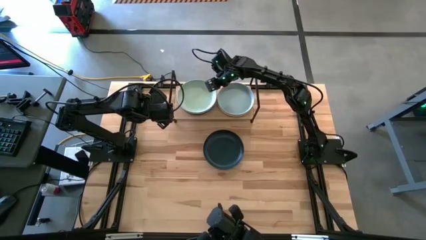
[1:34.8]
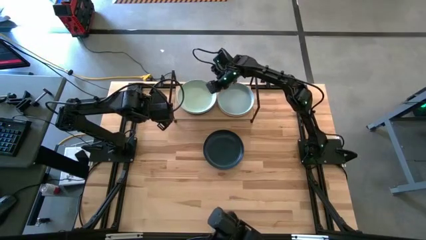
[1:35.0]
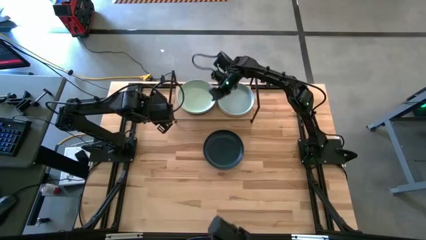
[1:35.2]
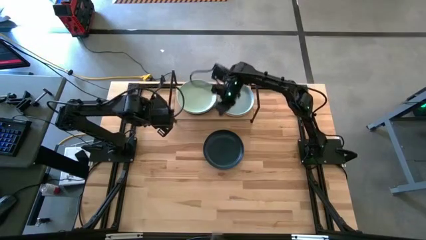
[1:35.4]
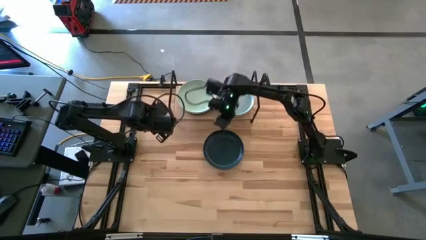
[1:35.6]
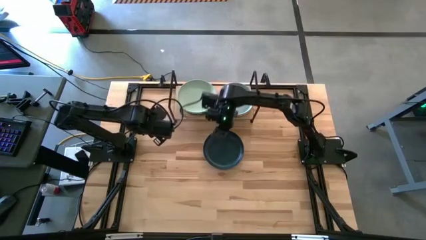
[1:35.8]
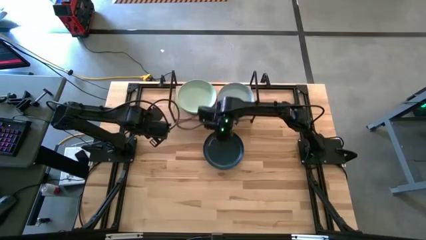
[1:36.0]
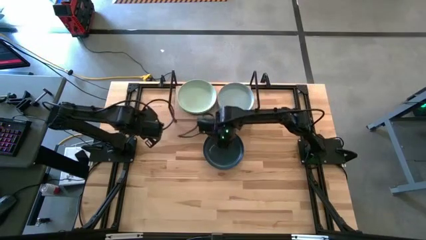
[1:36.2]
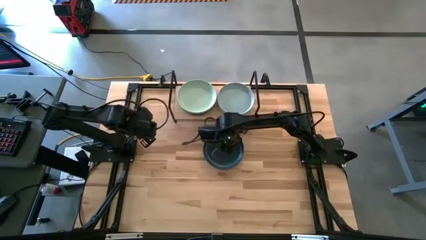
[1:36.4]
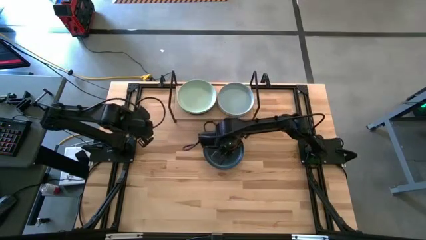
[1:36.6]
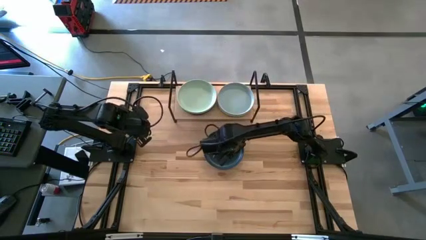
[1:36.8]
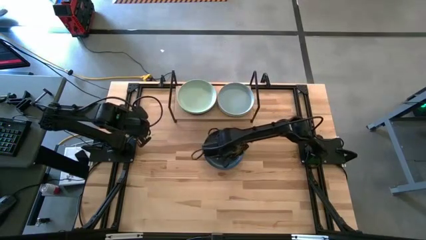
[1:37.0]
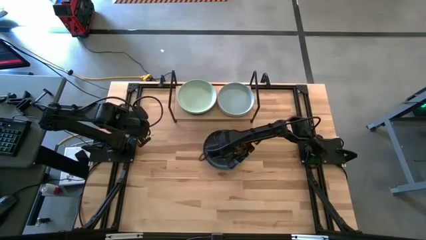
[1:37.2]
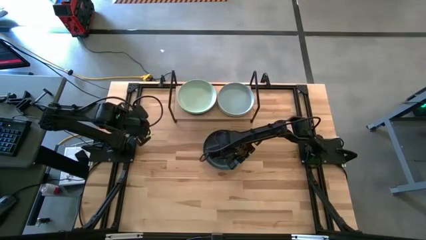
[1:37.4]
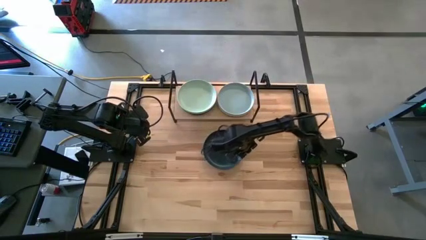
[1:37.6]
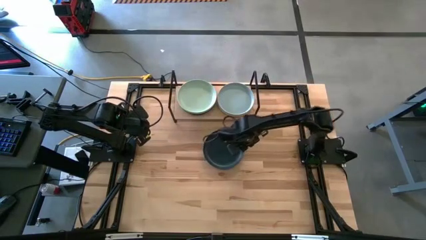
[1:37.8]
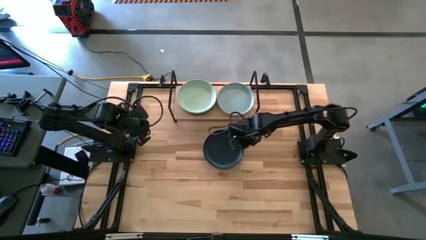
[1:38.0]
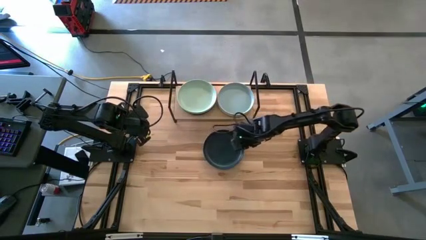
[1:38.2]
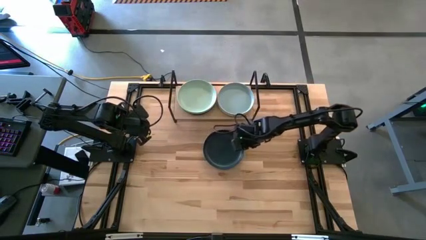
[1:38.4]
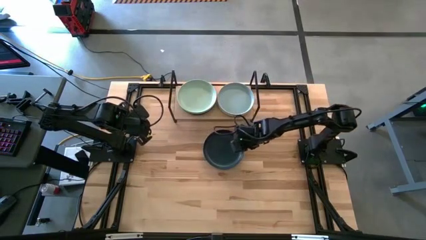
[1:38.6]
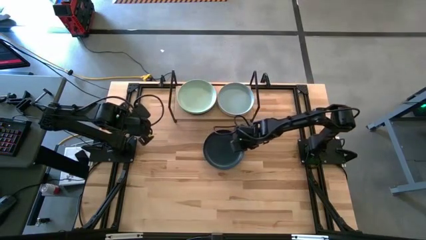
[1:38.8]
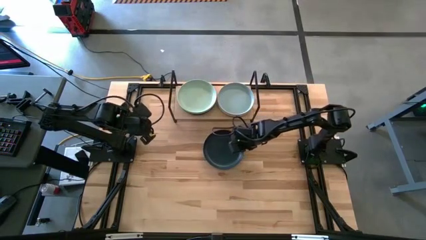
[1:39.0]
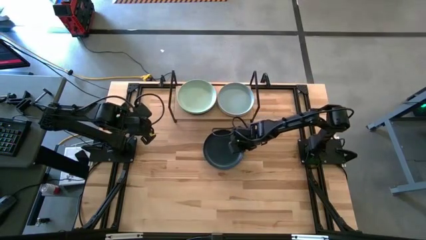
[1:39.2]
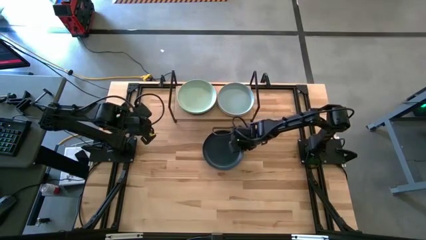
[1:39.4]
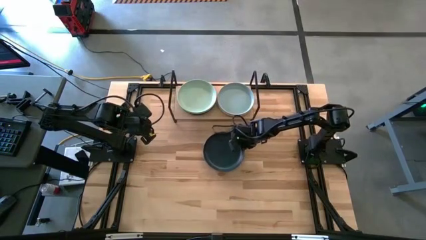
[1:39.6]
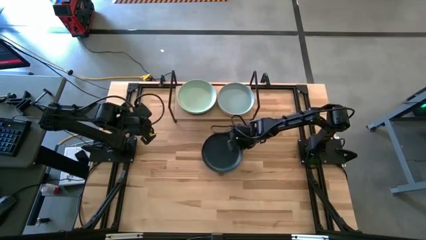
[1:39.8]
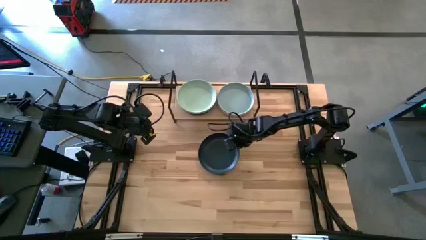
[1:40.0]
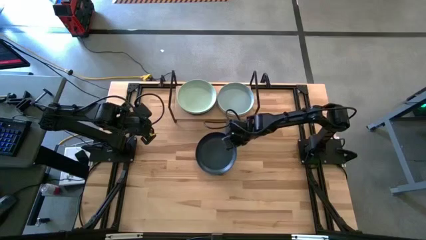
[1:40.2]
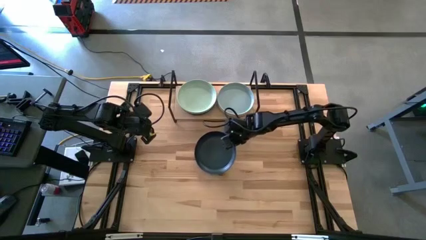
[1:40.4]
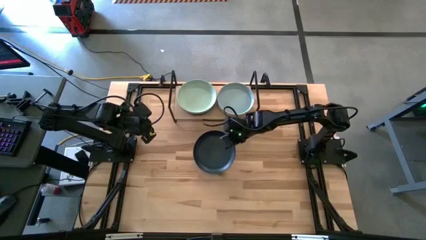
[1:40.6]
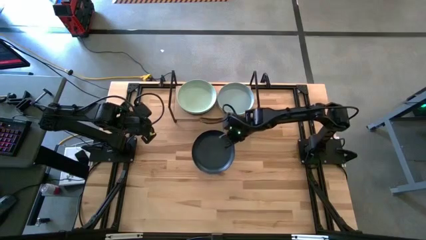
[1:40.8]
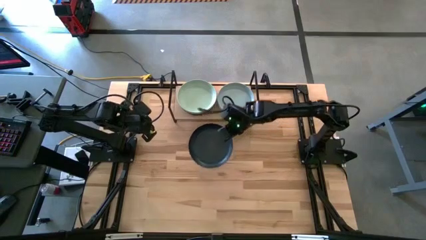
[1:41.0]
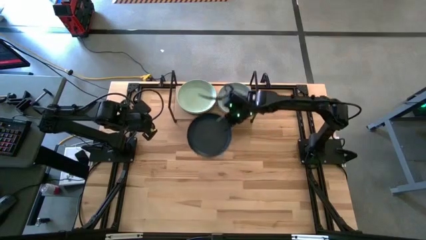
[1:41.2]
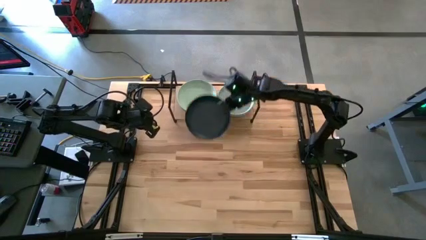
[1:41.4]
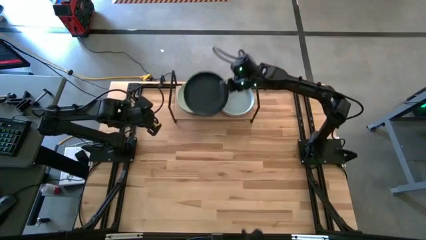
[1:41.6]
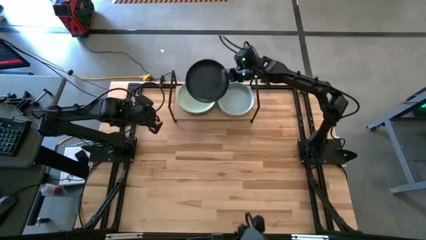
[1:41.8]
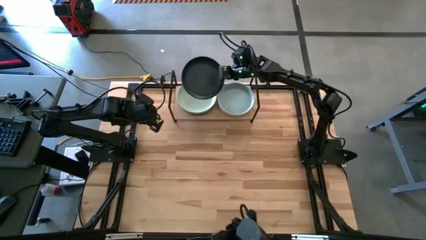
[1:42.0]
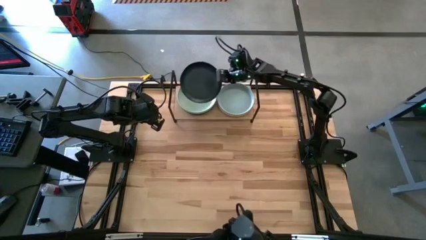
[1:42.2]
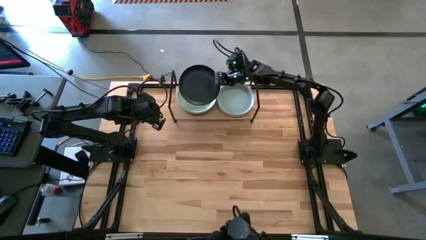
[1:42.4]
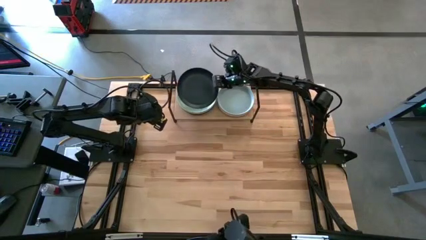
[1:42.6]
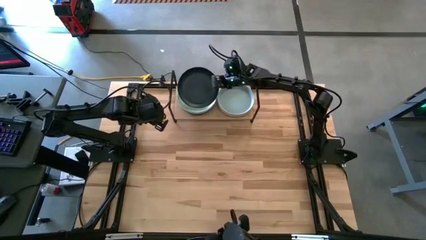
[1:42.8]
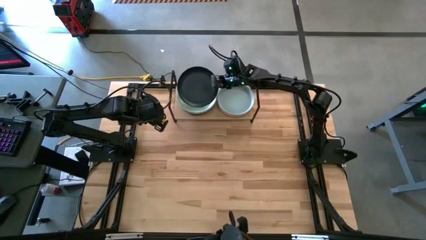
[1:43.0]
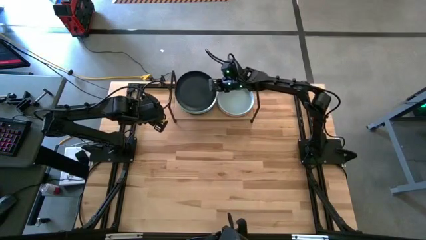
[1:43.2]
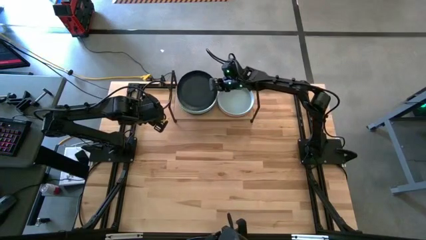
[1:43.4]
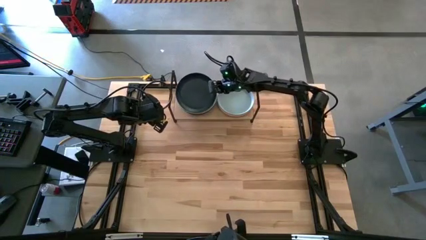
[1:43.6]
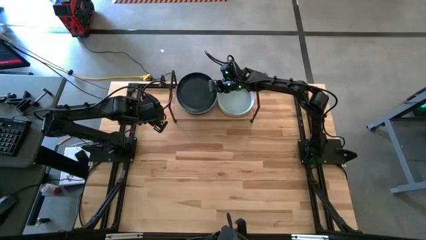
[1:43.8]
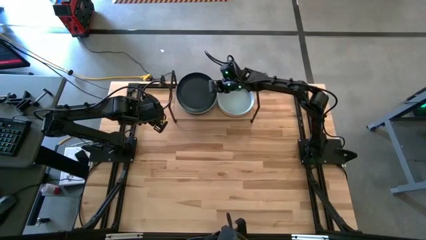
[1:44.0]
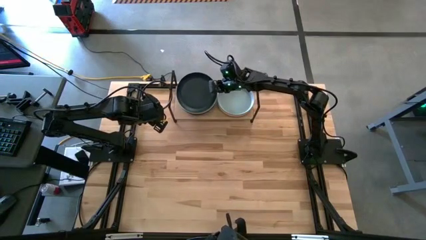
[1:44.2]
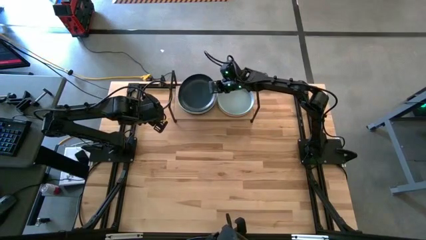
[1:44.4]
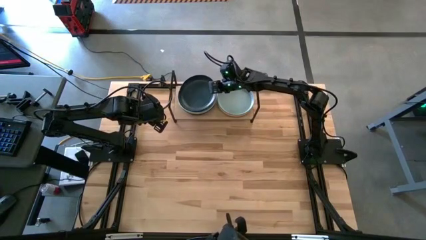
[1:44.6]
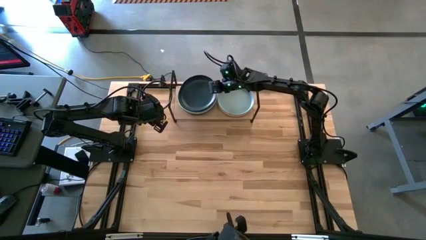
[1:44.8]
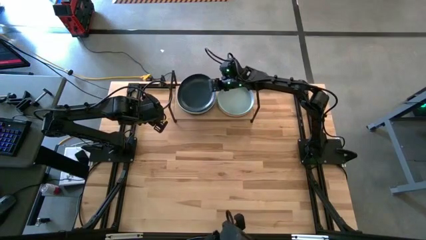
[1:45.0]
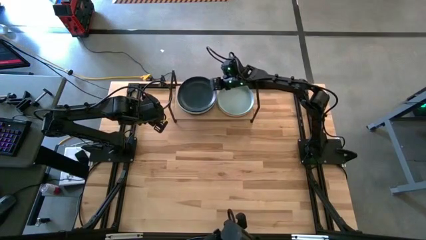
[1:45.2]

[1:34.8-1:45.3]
Task: Place and stack plates onto a shelf
Stack the navy blue plate on top of the green plate on the shelf

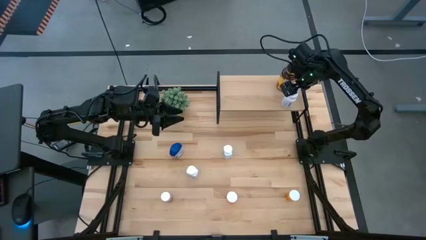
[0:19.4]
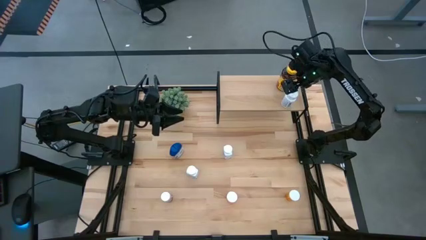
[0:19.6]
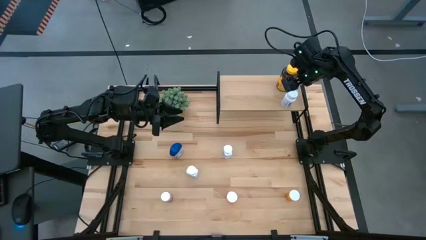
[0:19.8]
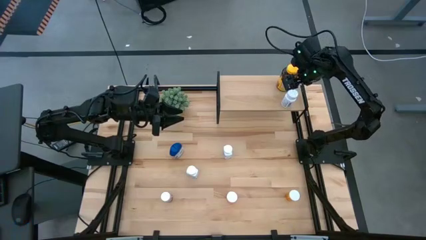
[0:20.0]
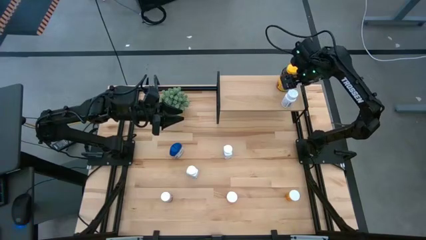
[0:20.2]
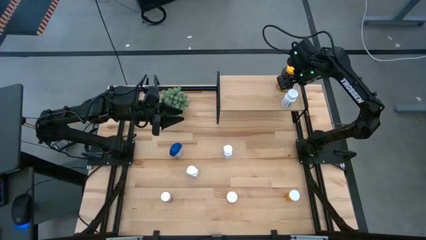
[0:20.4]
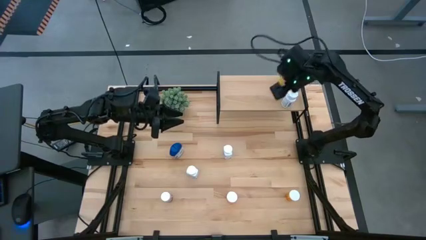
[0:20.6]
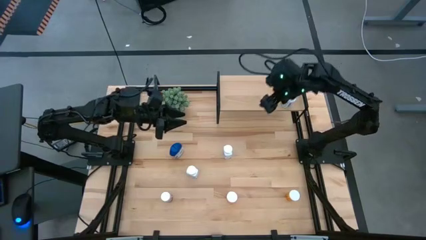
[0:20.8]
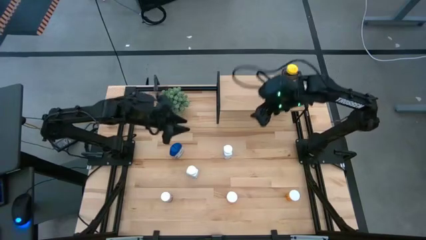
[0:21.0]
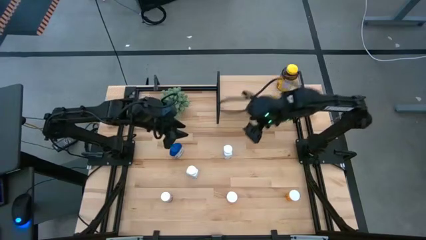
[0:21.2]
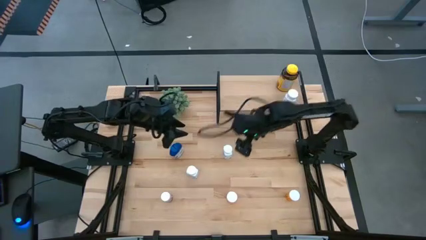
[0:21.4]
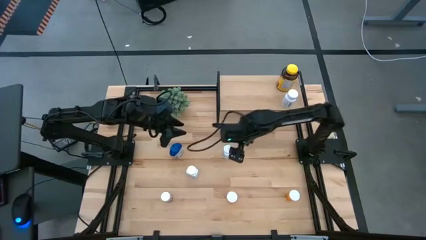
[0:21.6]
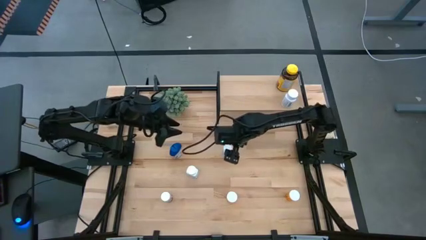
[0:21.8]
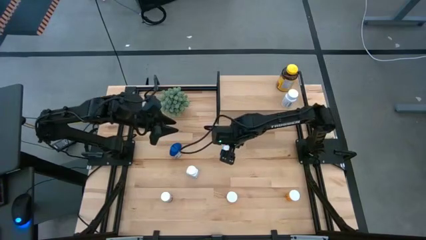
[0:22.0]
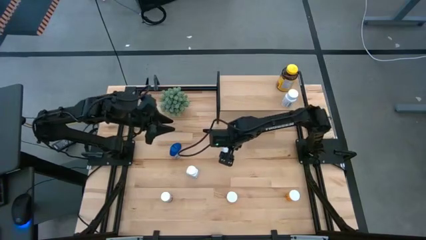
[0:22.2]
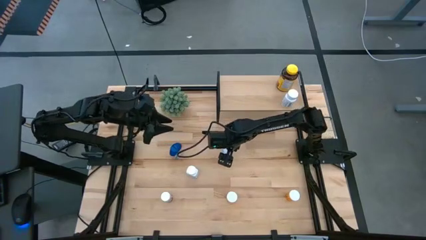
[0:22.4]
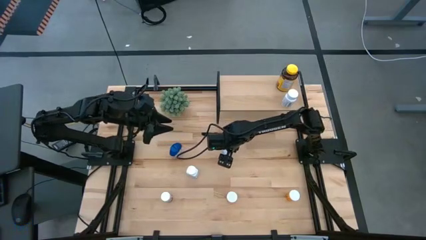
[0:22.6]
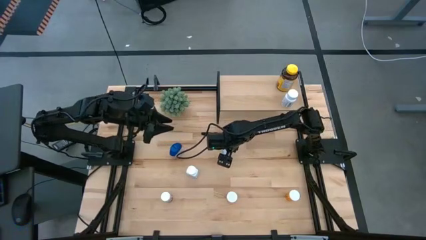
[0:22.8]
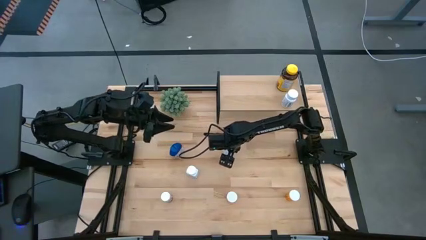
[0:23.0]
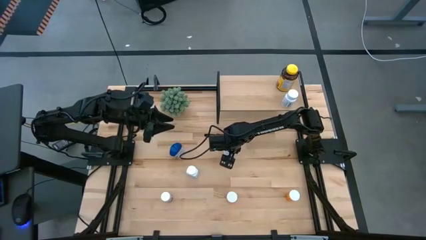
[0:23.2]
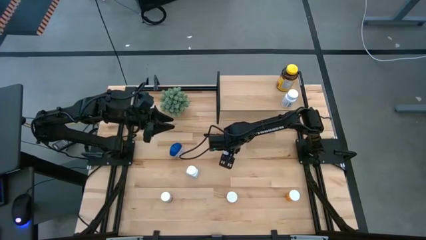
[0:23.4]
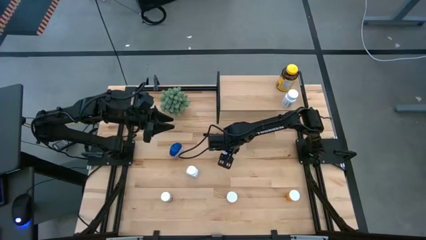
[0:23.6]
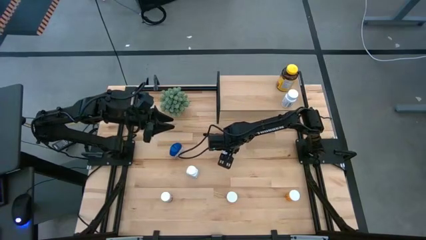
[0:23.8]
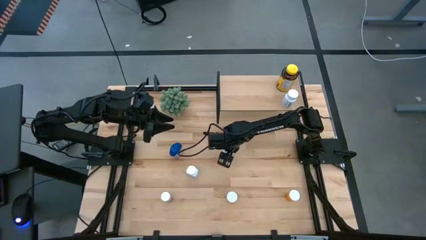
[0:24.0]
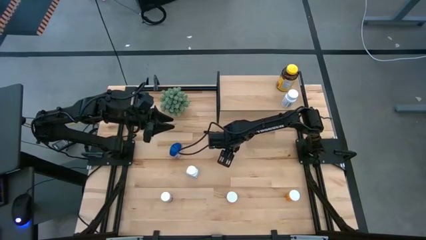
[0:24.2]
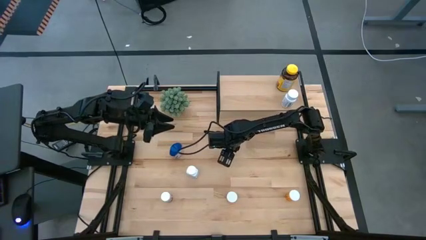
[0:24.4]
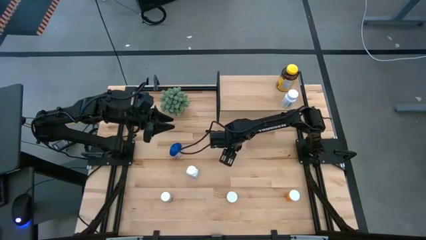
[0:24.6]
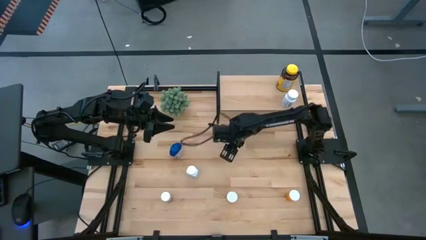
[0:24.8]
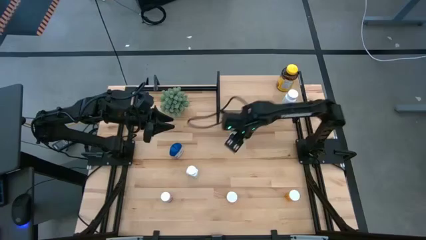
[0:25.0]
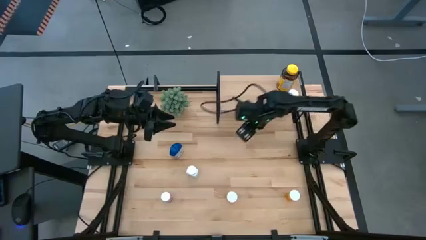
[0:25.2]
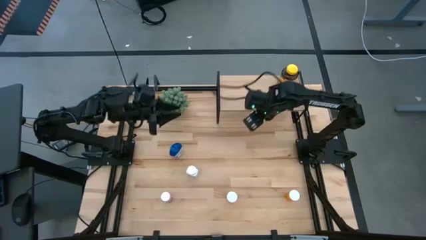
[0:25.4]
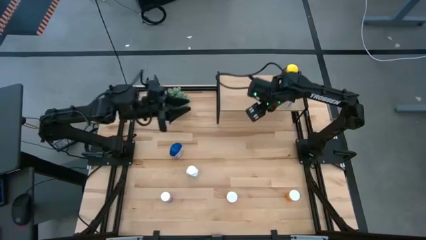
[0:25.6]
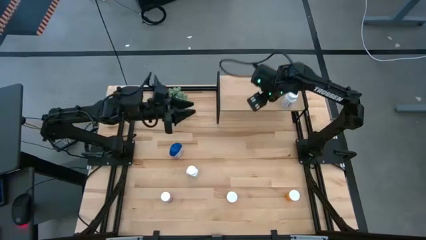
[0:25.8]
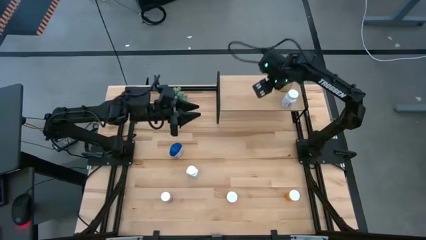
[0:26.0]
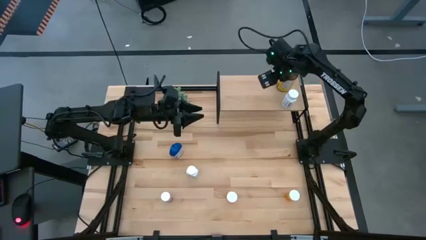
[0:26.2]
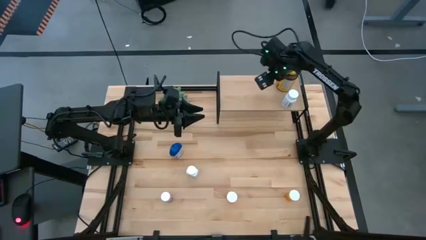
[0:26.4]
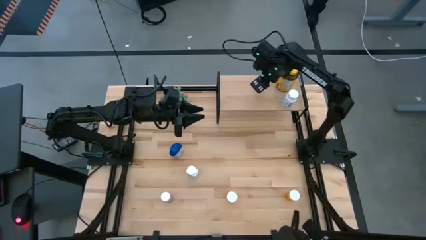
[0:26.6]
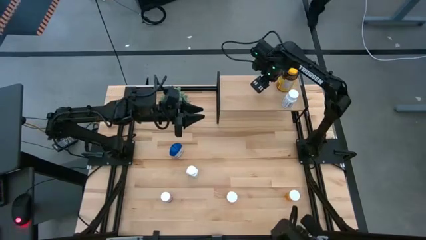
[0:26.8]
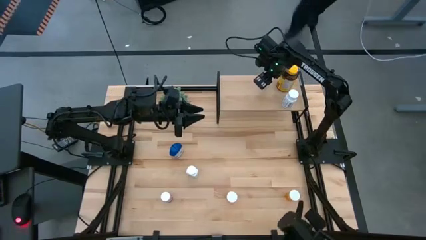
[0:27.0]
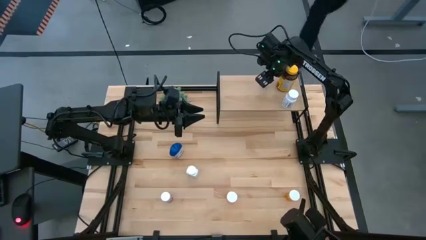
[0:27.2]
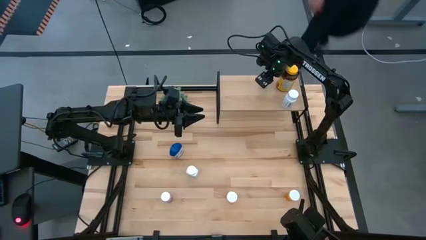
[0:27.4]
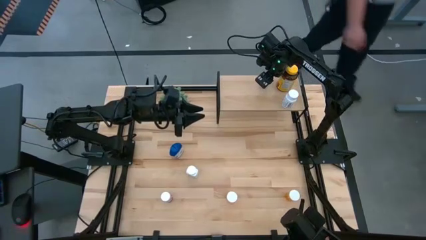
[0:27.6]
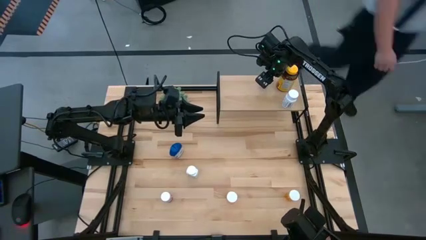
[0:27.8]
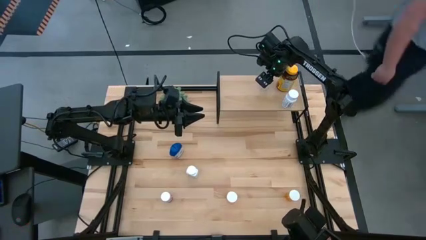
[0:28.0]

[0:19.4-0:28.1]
Task: Pick and place medicine bottles onto shelf by color
Put the top white and blue medicine bottle on the shelf
